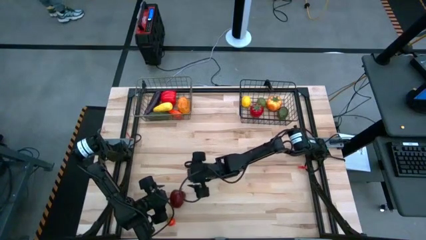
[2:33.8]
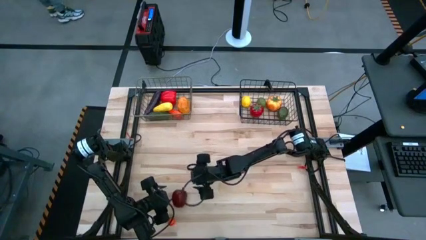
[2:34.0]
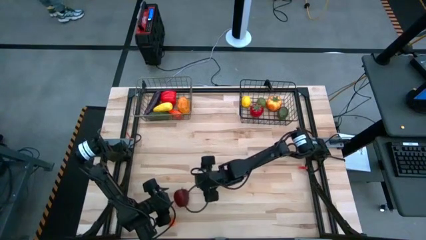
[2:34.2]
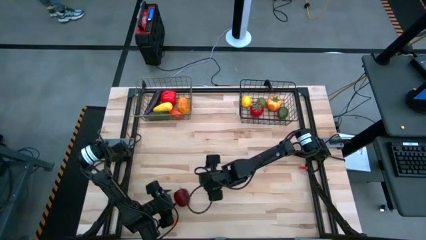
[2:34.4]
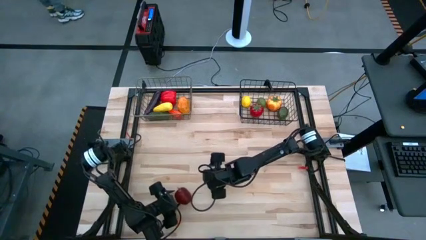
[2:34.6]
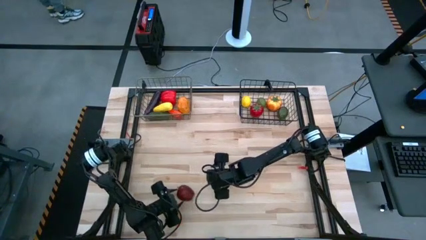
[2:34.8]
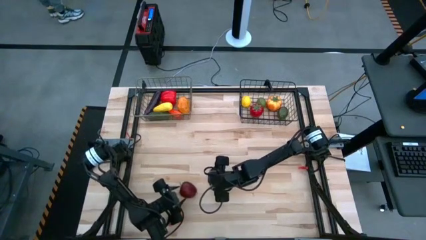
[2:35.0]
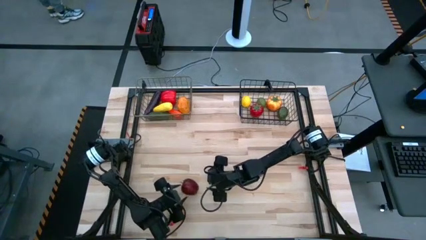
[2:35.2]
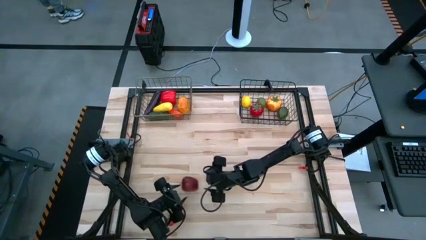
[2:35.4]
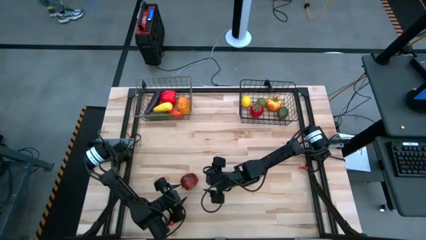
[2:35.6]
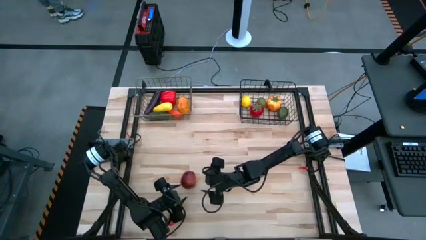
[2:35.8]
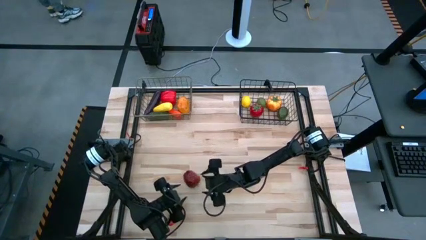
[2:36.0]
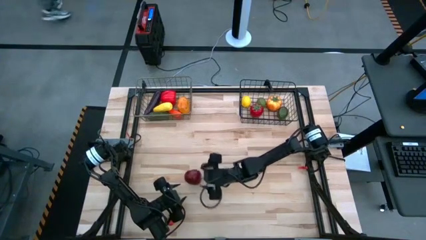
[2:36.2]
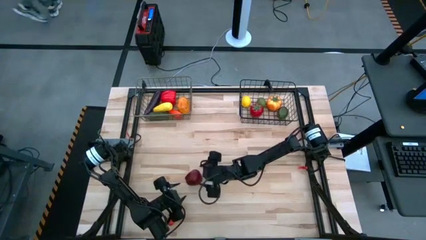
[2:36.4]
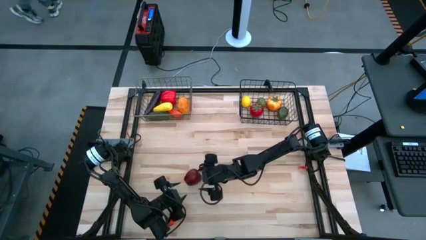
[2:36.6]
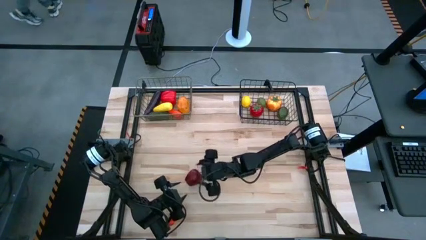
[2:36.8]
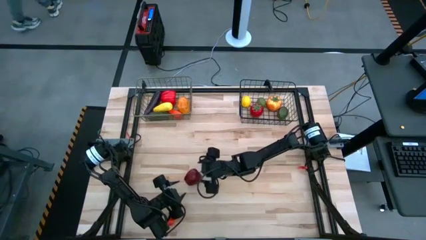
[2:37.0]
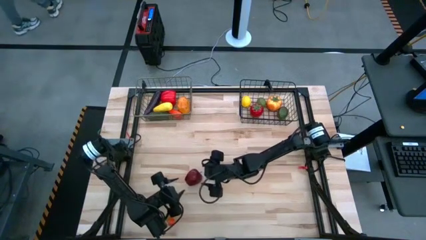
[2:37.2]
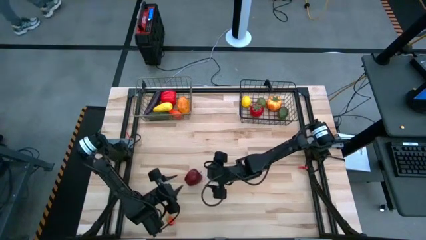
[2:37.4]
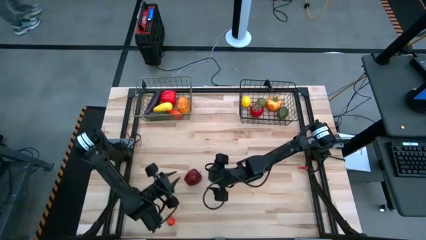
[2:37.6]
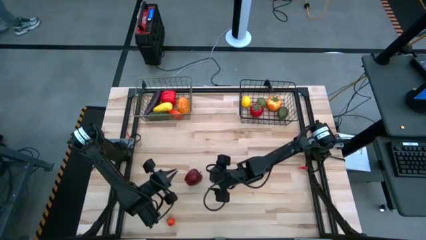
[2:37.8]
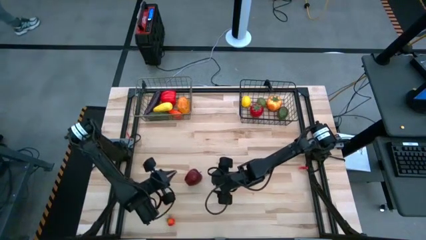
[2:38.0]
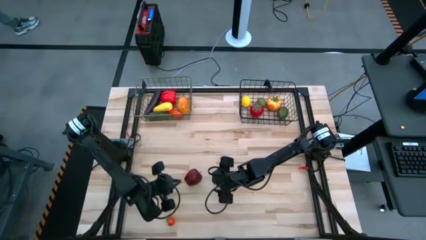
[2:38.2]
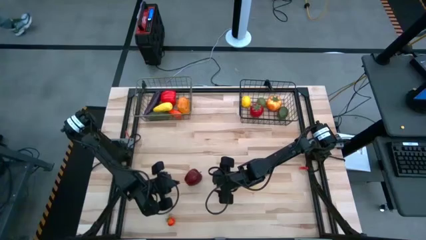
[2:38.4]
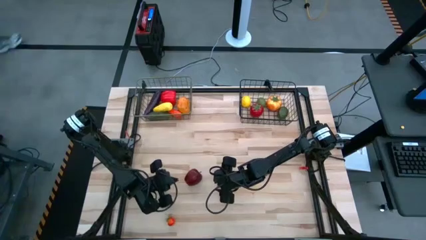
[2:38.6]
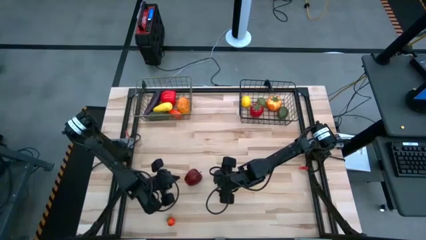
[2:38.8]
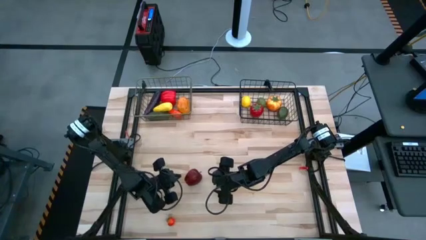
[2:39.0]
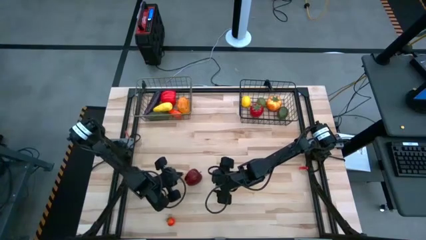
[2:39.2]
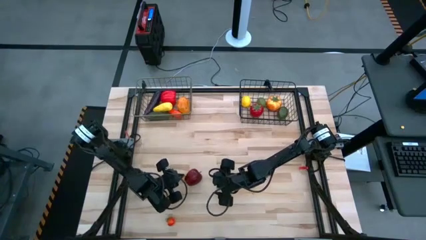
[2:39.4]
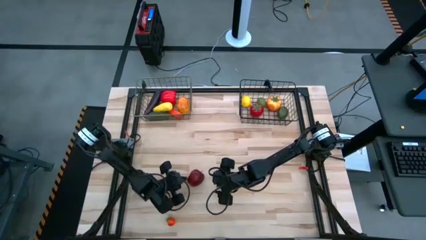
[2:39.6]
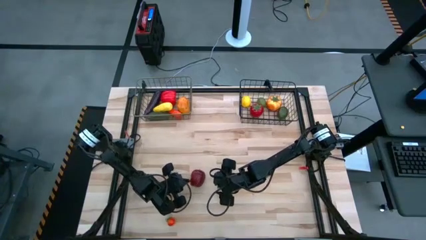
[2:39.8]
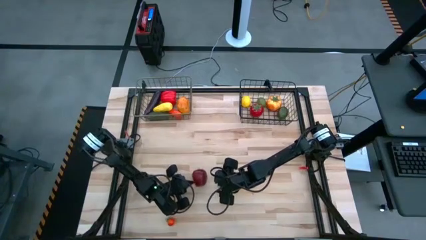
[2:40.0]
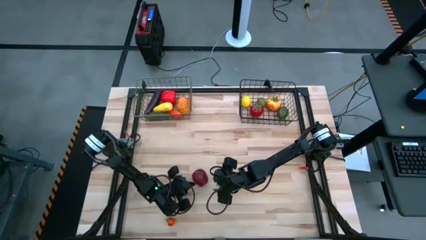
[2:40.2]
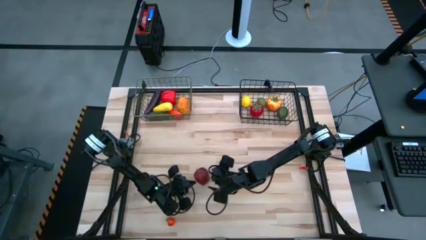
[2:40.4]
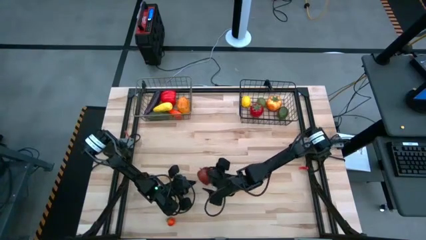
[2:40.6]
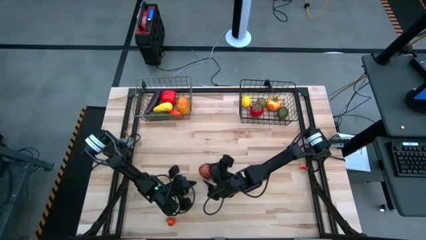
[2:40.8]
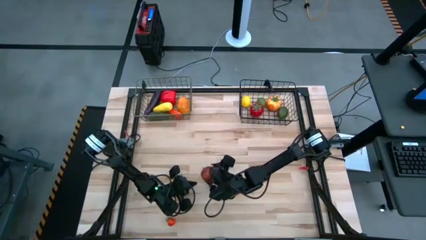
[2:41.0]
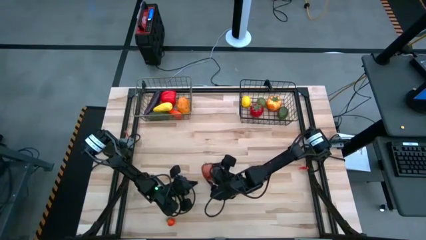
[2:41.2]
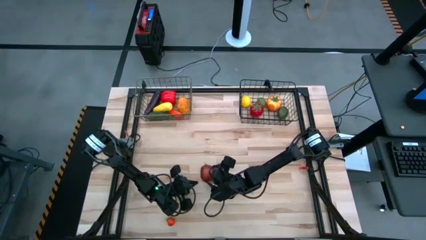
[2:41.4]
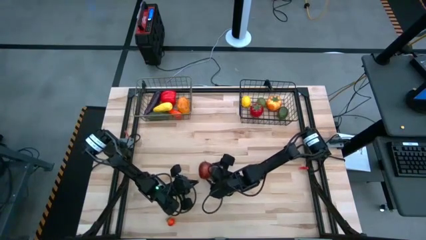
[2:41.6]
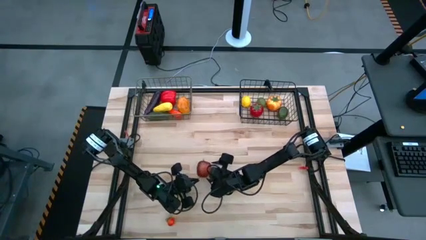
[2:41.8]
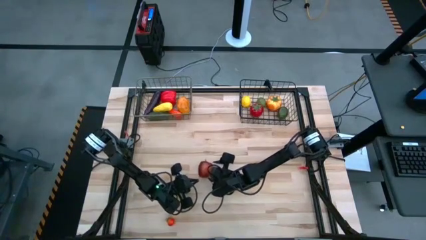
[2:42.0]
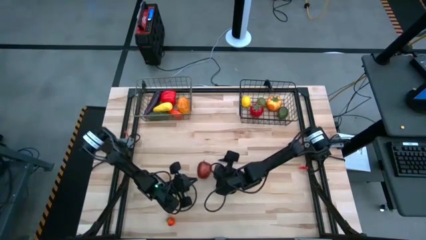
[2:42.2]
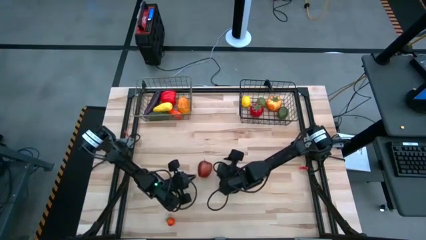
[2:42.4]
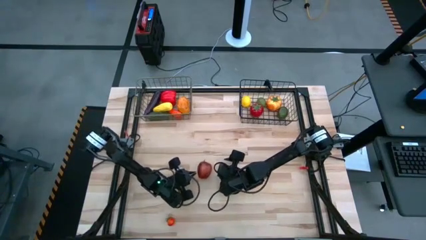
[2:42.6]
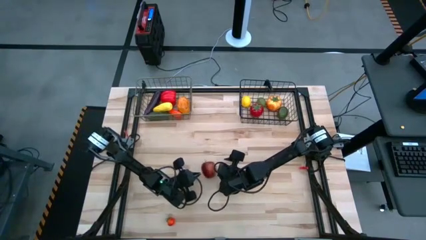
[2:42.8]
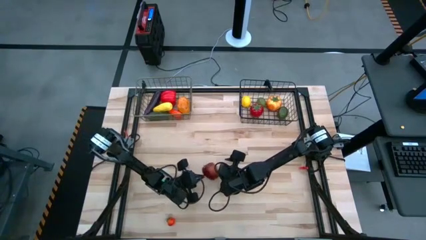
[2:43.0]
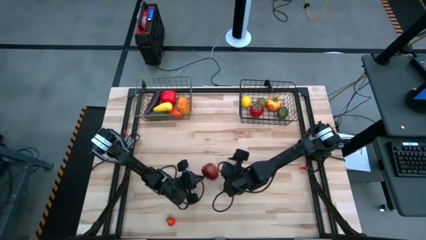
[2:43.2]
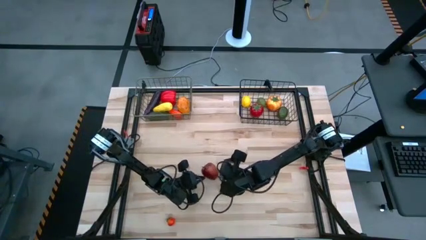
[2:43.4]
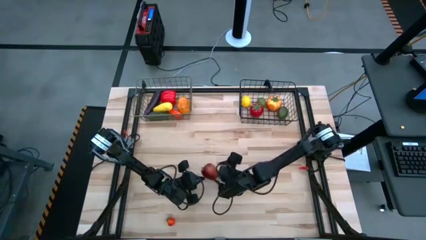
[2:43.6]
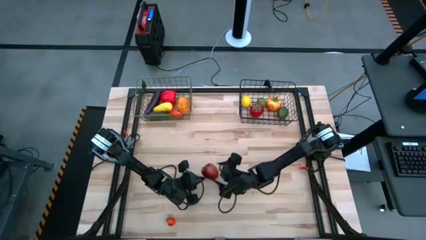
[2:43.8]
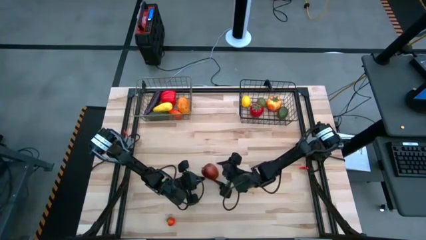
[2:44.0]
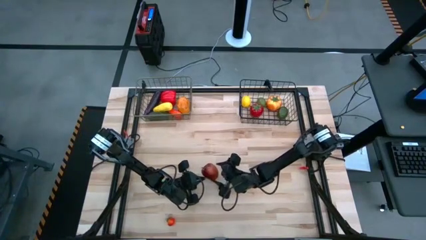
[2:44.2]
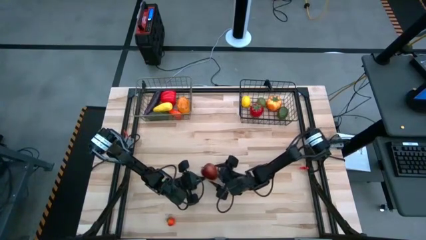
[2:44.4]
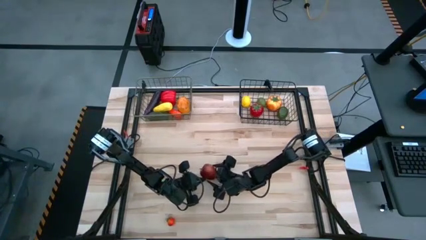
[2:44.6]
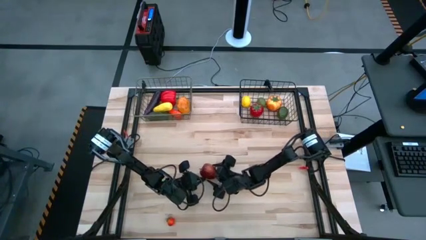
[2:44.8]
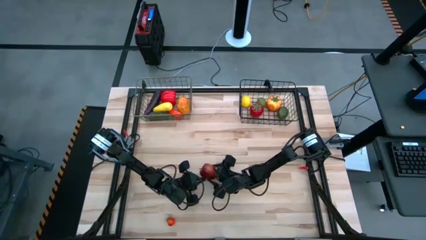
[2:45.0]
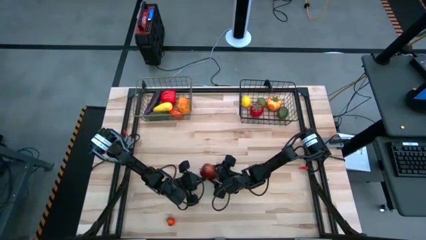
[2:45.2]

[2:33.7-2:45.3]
Task: Sort produce into baskets
Put the apple into the black wire basket

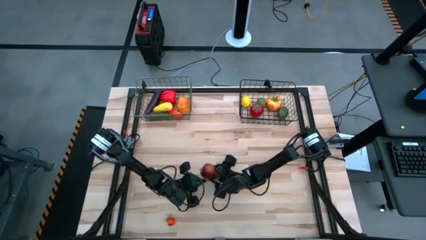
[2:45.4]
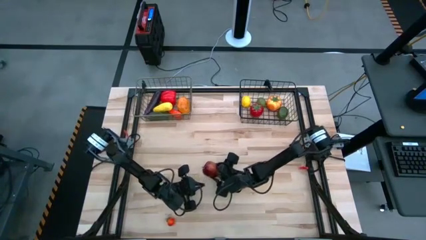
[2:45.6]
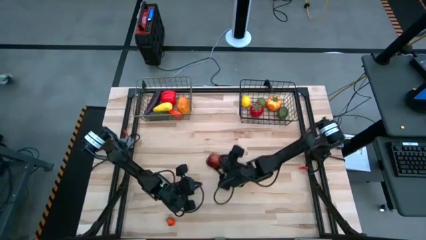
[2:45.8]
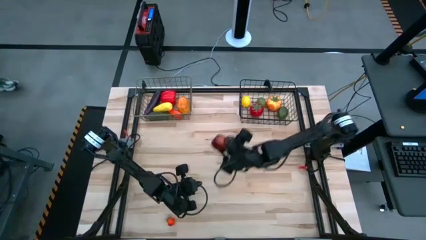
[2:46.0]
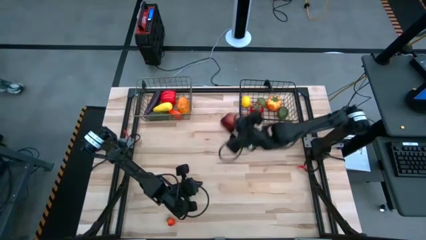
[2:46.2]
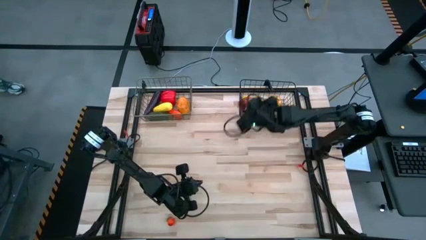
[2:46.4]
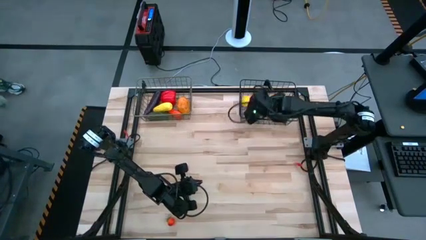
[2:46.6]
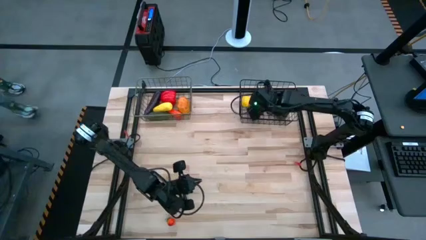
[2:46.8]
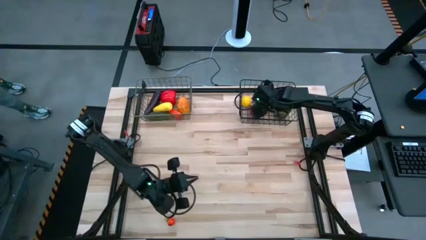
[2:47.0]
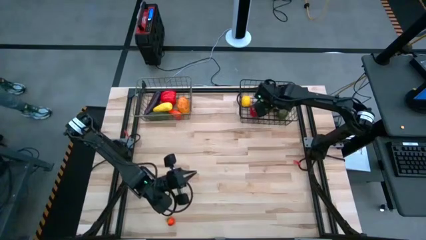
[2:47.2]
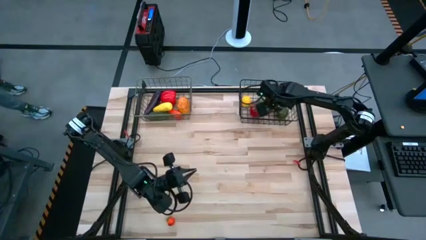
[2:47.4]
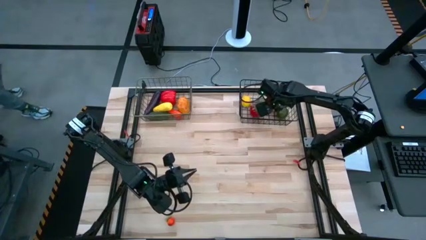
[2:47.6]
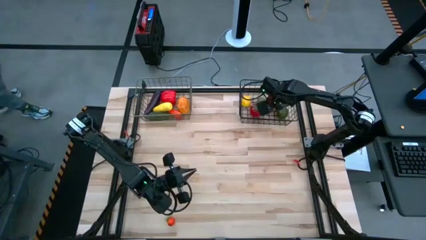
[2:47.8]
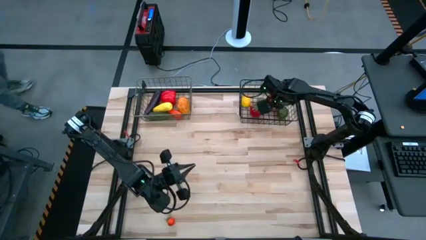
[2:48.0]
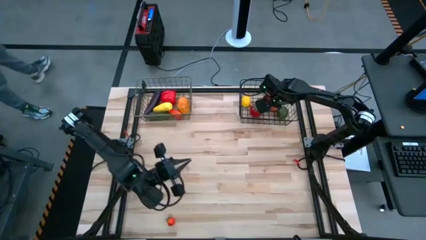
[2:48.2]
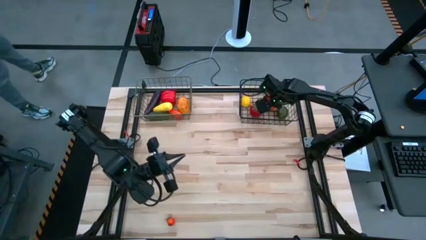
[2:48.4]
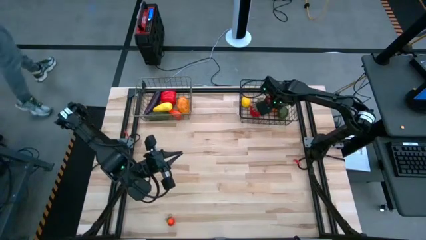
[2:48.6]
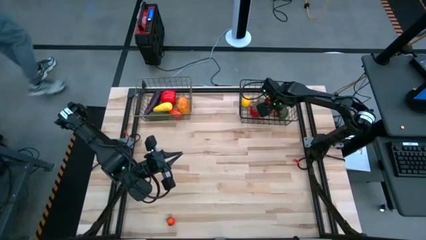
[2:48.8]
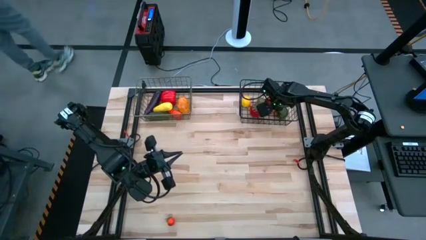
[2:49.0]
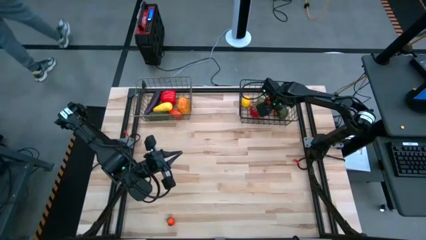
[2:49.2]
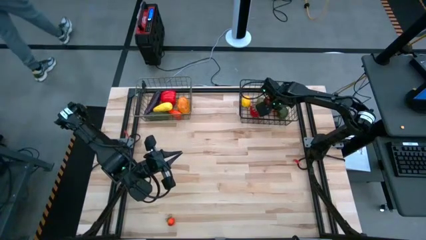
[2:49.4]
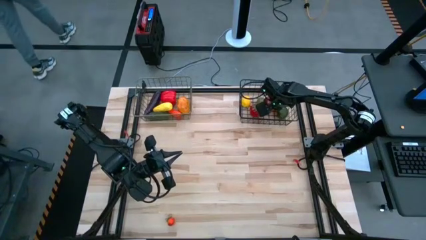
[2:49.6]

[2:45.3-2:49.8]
Put the apple into the black wire basket
